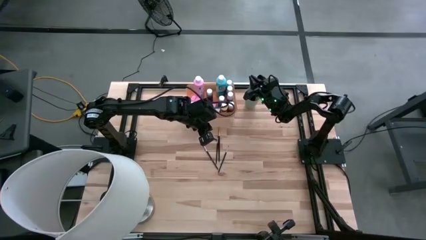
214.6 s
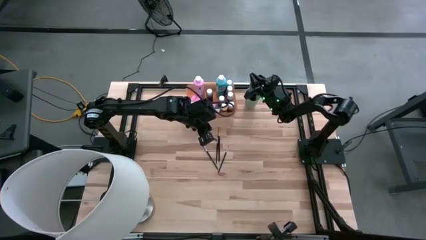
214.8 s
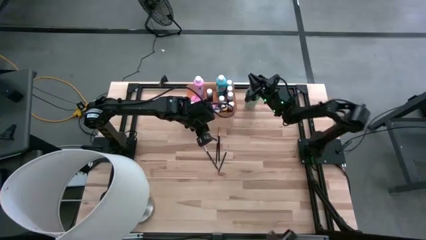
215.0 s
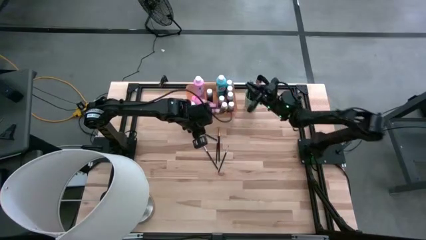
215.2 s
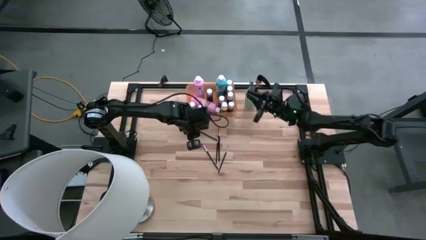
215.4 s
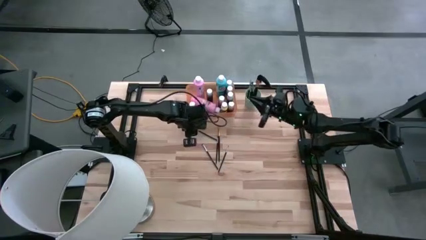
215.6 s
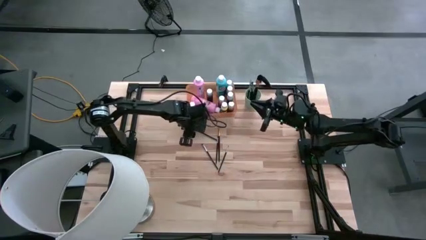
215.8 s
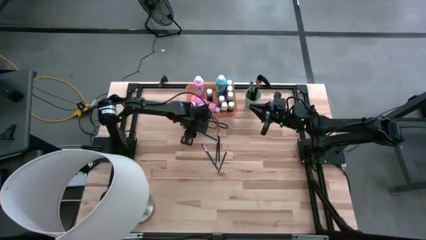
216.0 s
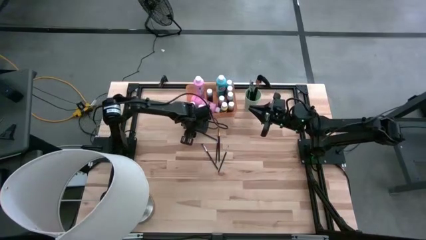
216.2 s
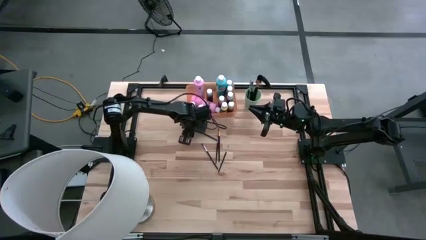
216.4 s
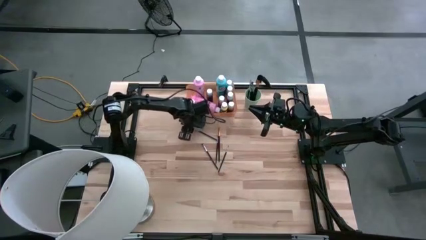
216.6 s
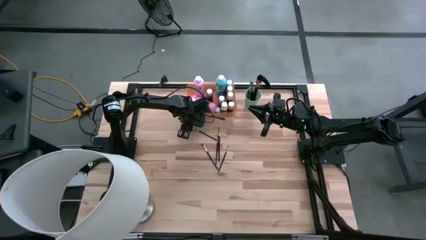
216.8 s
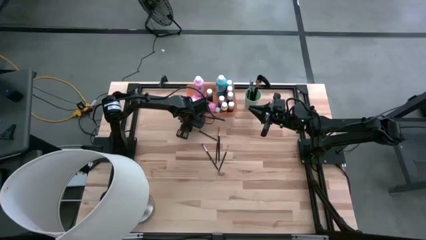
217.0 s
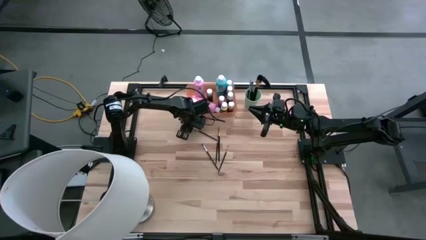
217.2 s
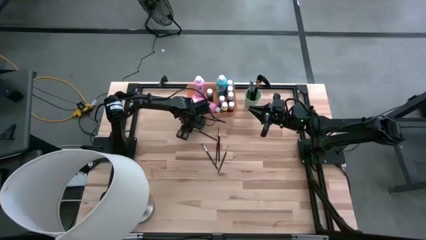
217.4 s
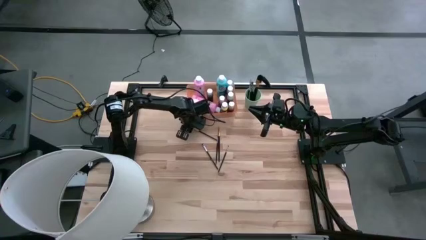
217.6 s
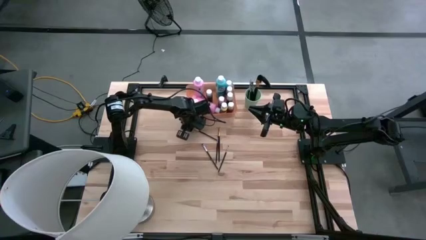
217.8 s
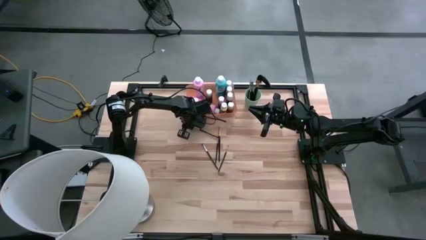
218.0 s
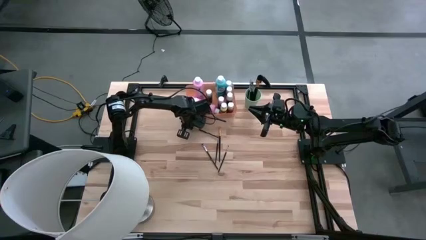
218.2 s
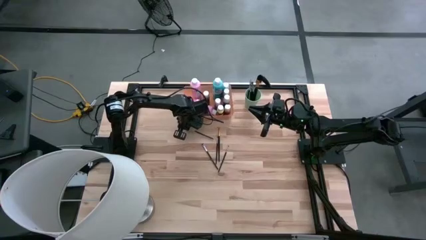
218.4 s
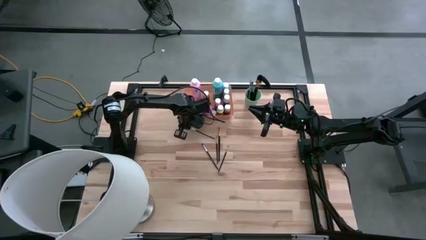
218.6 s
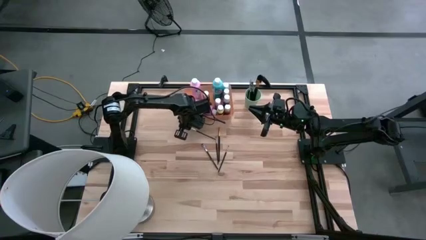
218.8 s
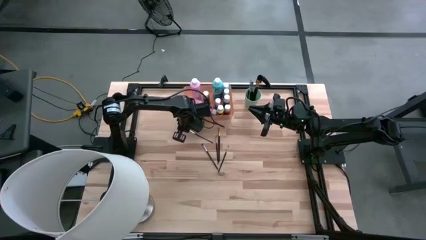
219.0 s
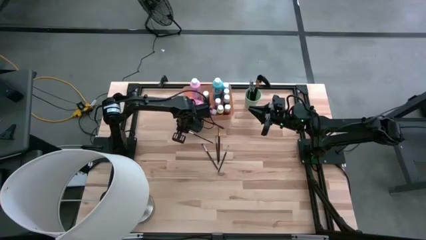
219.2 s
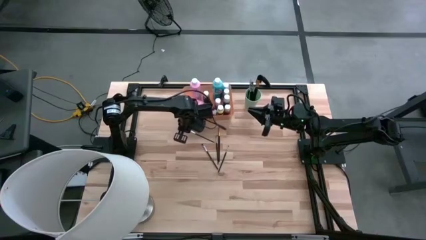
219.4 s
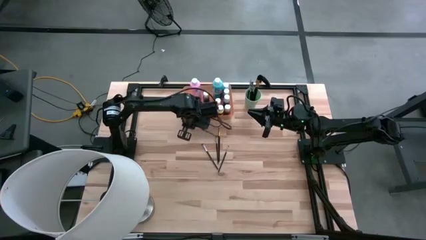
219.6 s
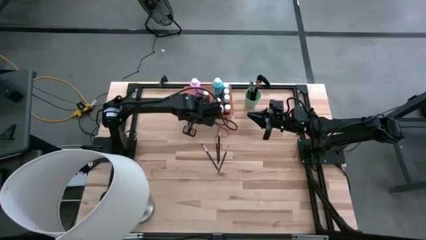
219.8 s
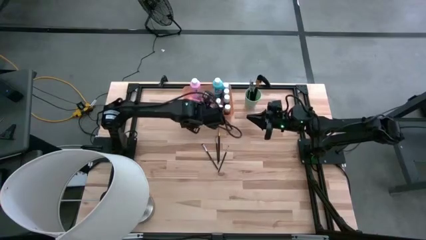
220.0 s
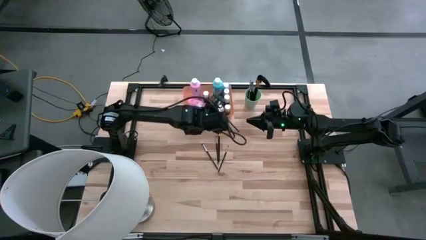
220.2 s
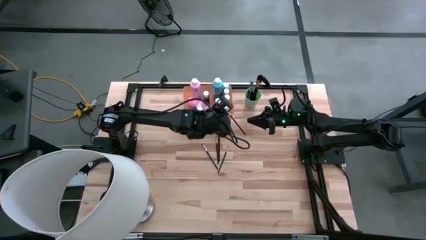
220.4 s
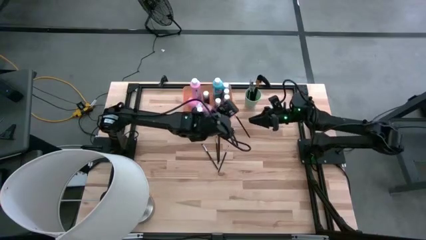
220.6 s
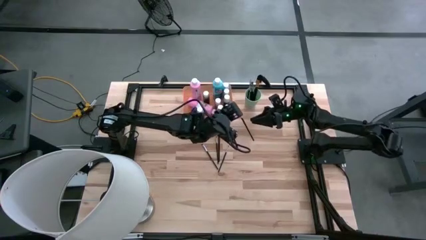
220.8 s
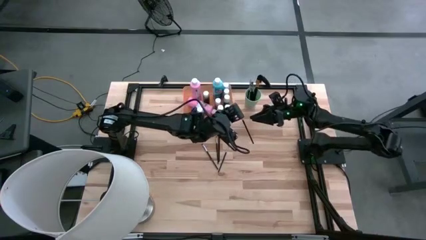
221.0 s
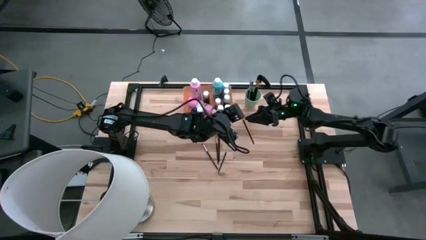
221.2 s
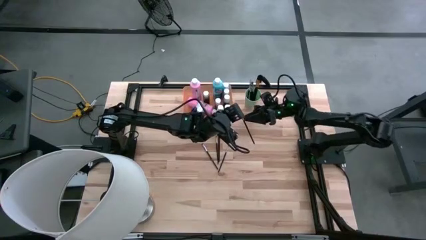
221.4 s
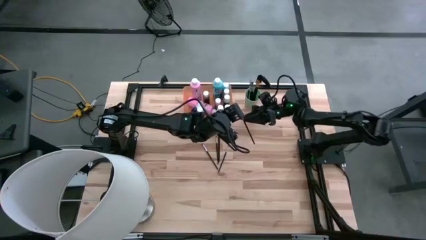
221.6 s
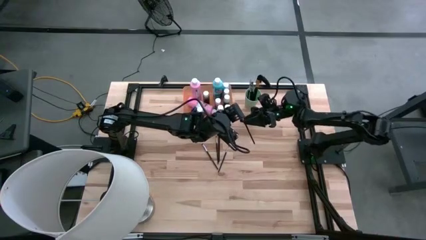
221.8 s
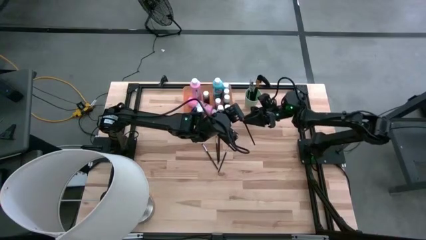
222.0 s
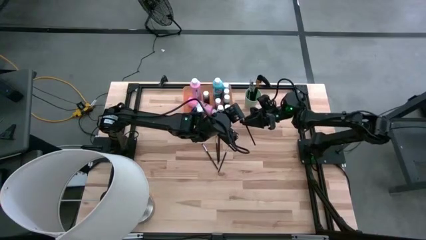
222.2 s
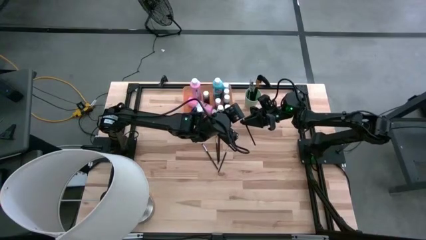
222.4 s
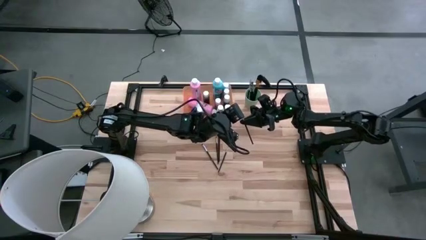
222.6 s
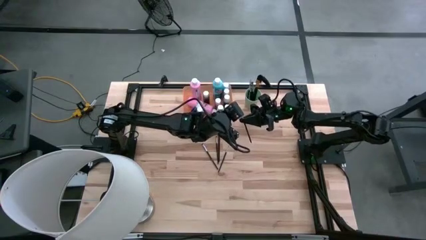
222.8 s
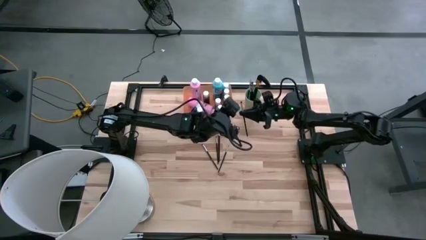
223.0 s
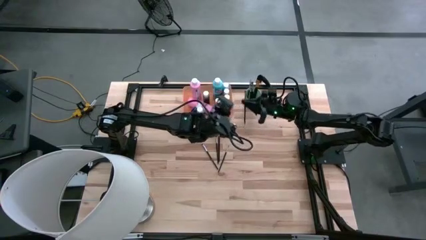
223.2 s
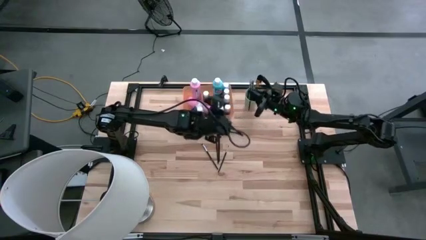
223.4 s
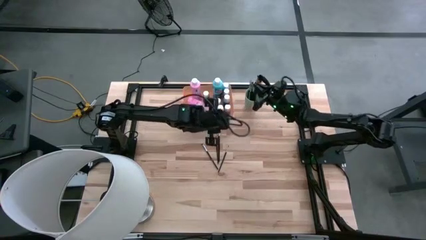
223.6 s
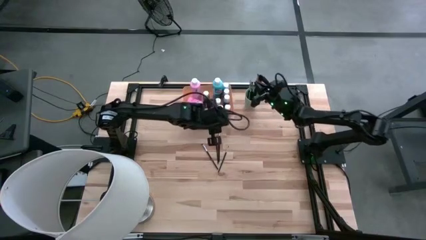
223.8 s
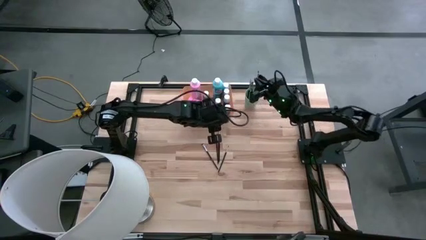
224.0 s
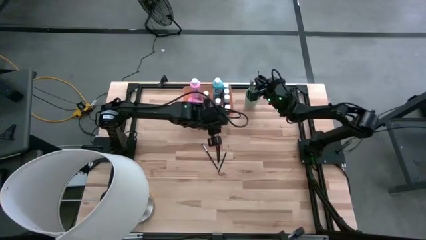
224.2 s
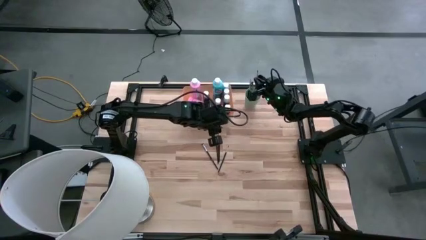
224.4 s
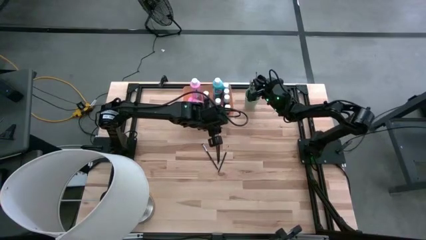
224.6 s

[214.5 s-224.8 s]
Task: Pick & Place Paint Supplies
Put the silver paint brush into the green cup

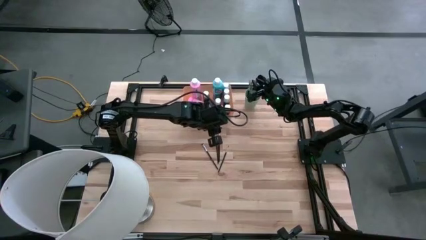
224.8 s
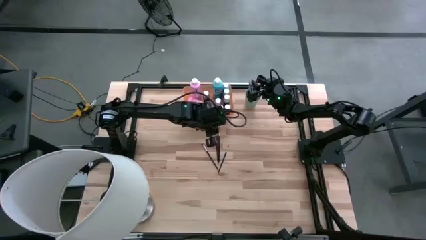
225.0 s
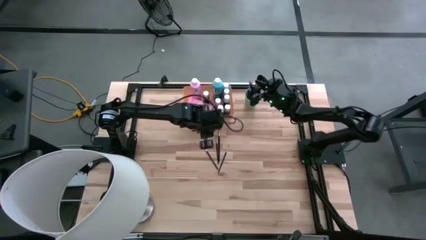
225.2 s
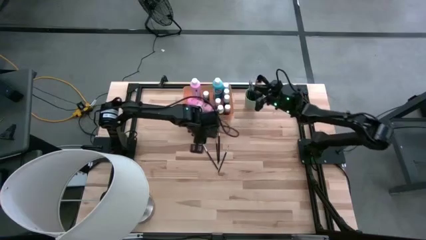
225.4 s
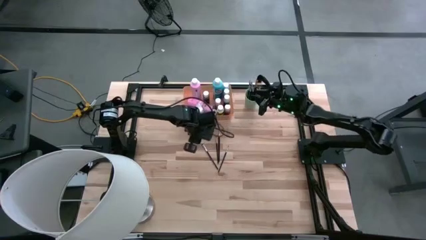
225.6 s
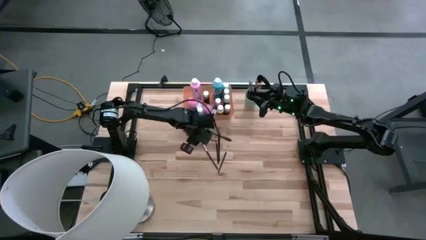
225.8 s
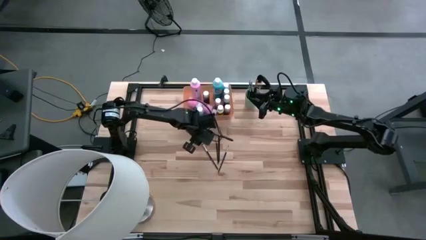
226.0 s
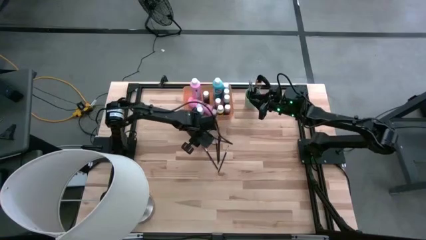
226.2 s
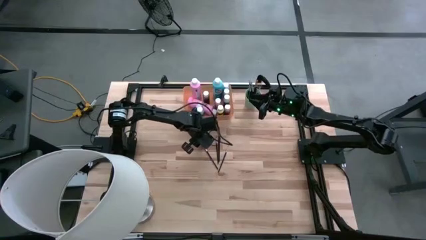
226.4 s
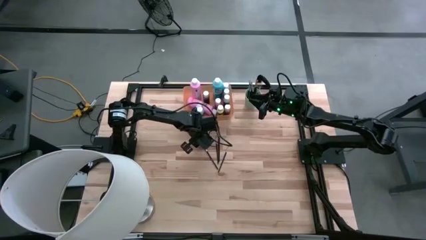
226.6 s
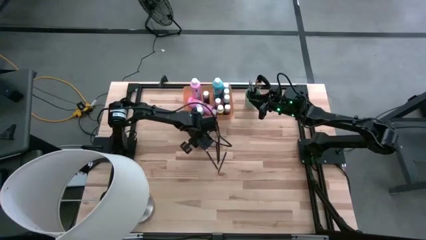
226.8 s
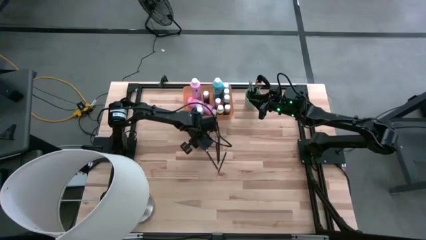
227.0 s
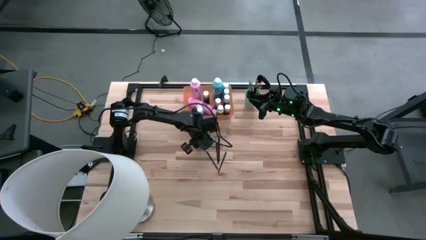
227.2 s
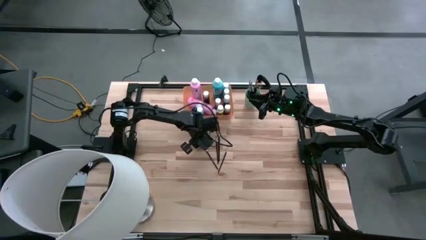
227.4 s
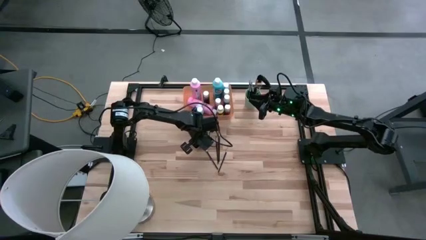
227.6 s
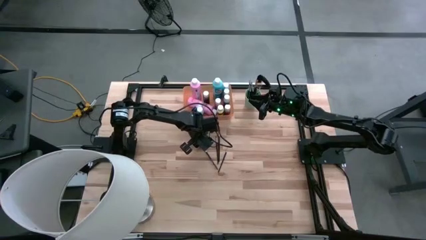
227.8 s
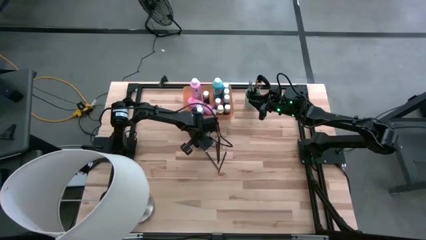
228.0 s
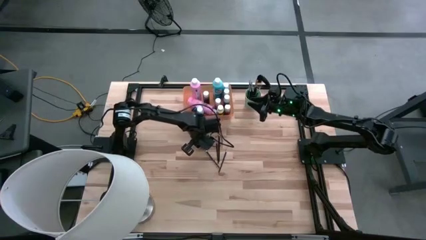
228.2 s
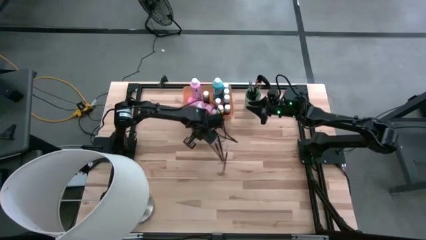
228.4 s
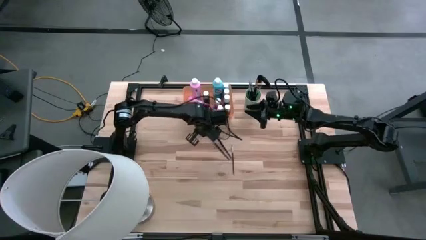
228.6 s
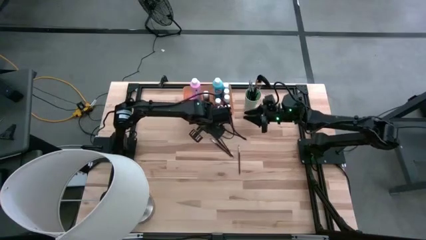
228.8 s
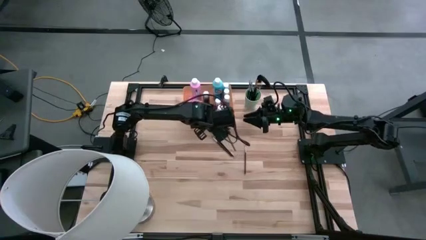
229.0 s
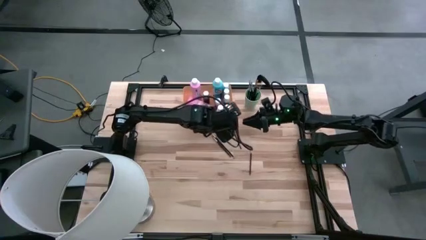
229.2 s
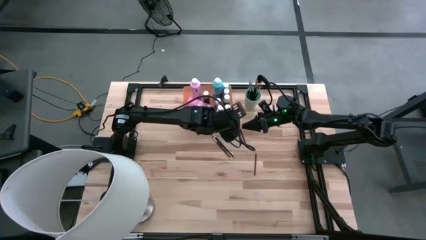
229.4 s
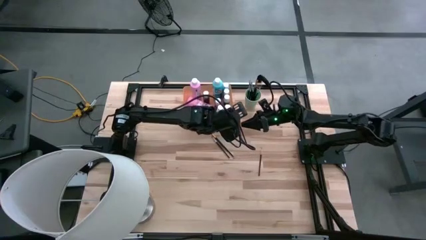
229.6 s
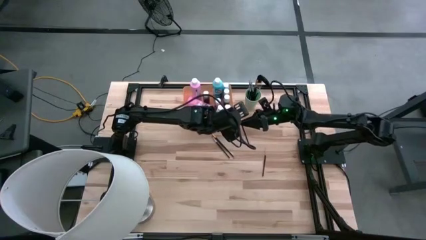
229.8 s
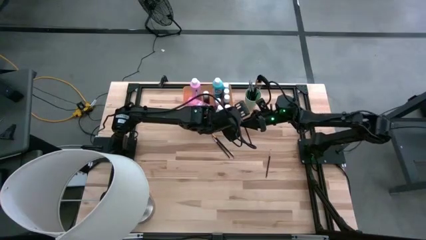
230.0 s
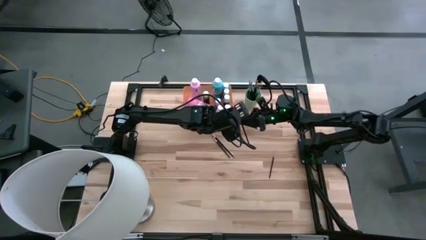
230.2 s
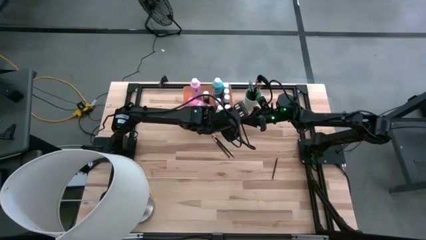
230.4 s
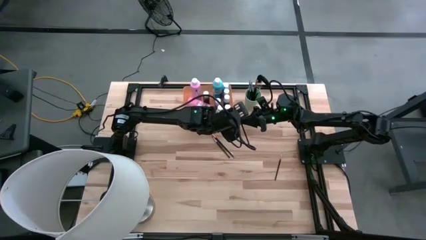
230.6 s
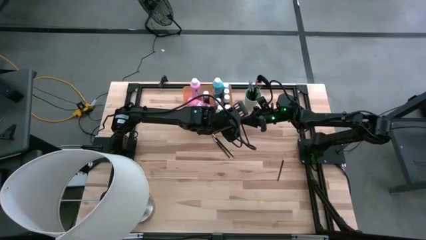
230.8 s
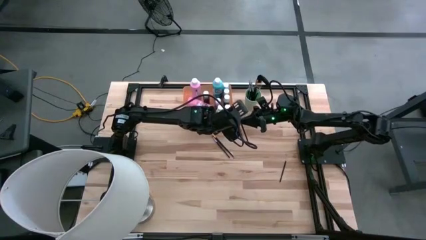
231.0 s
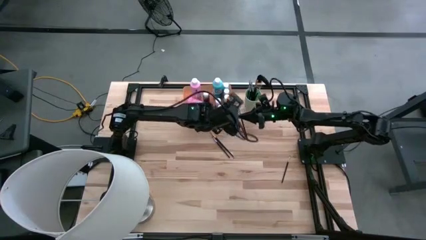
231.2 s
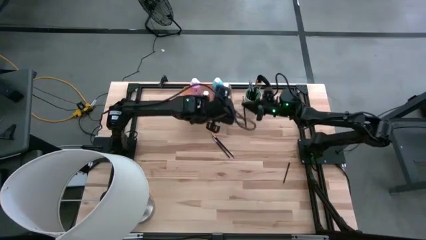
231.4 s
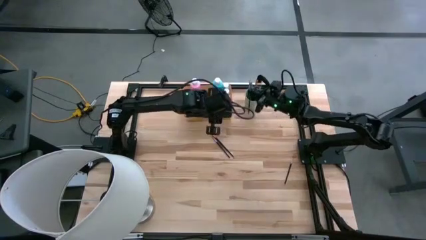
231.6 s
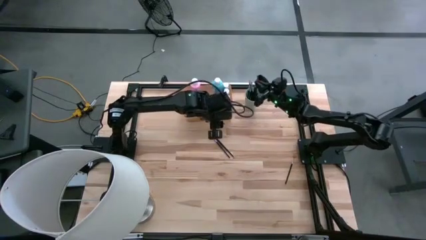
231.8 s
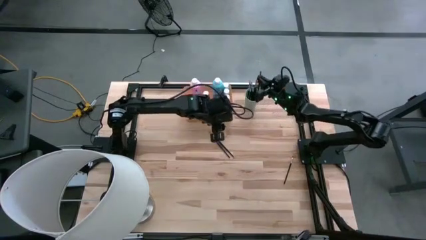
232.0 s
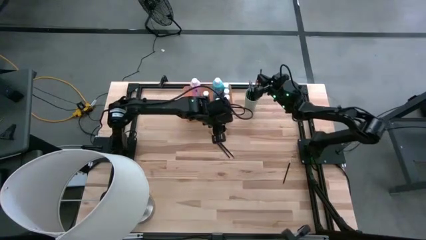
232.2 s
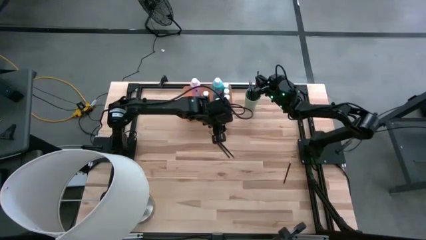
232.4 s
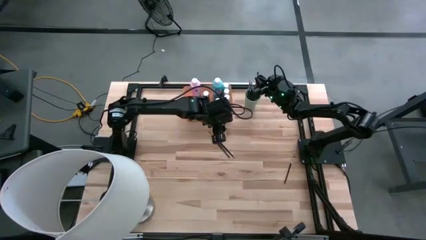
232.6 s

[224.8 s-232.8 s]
Put the silver paint brush into the green cup
